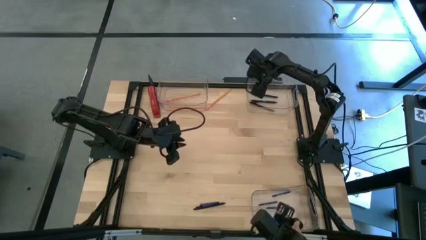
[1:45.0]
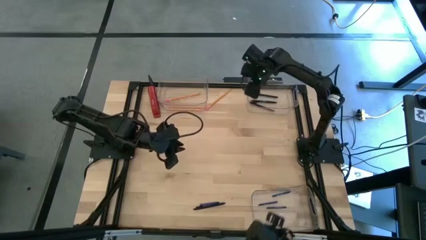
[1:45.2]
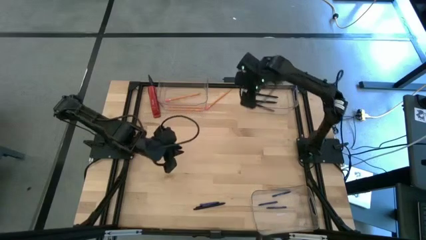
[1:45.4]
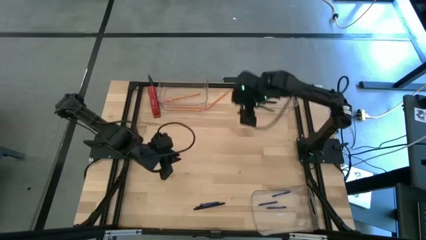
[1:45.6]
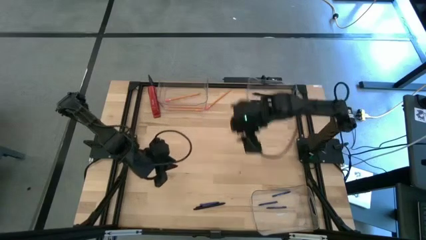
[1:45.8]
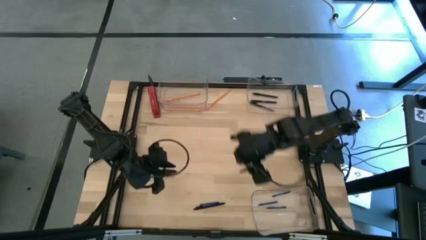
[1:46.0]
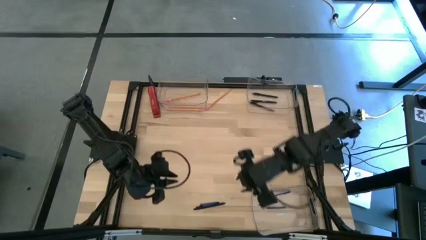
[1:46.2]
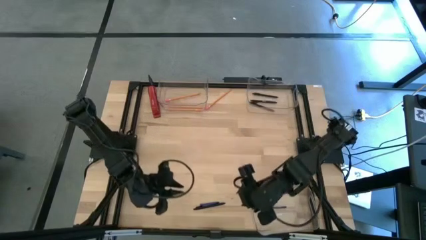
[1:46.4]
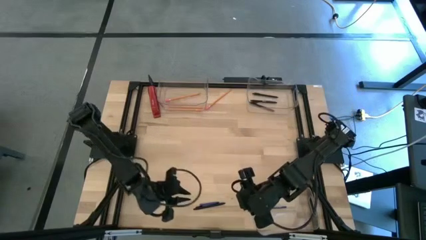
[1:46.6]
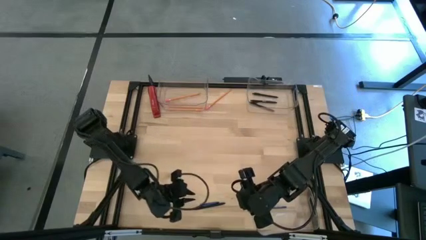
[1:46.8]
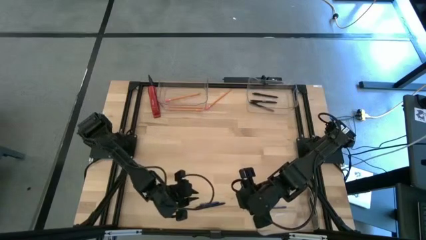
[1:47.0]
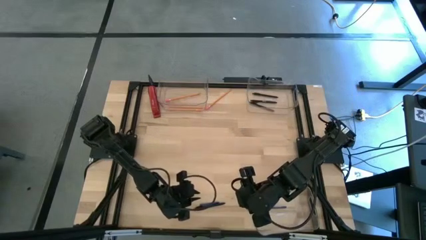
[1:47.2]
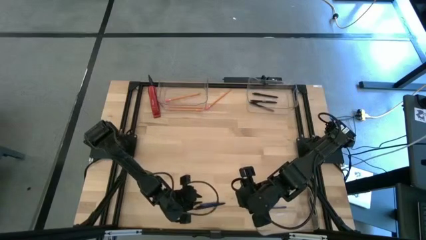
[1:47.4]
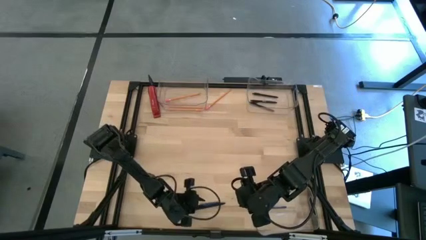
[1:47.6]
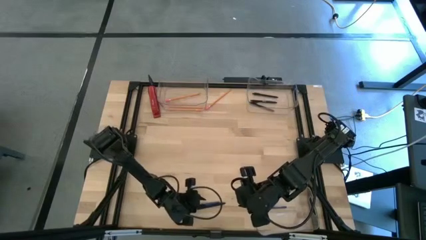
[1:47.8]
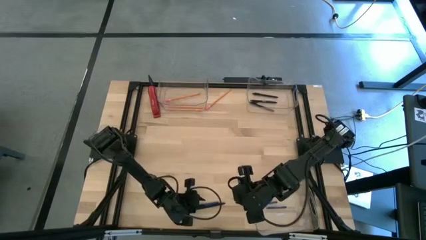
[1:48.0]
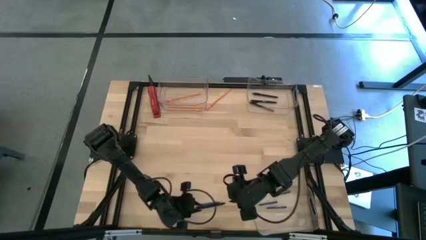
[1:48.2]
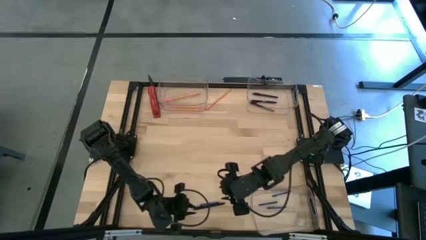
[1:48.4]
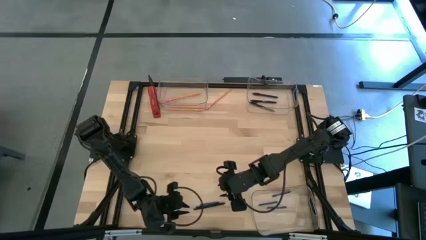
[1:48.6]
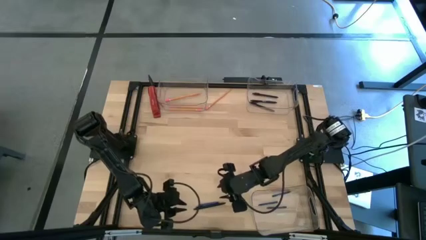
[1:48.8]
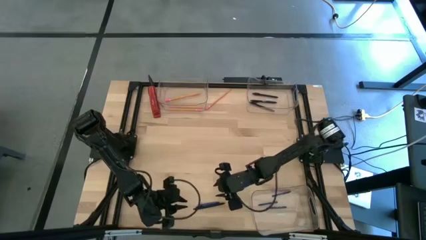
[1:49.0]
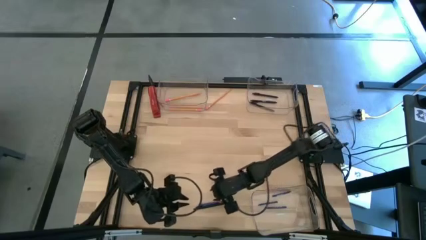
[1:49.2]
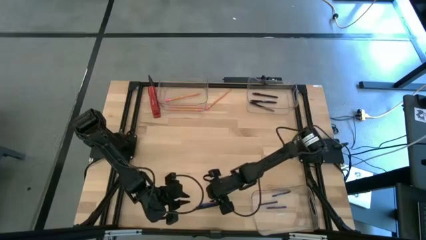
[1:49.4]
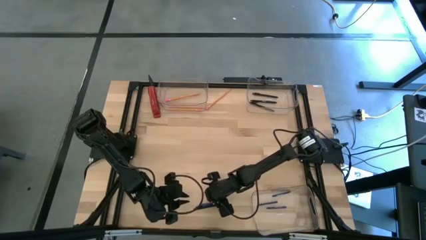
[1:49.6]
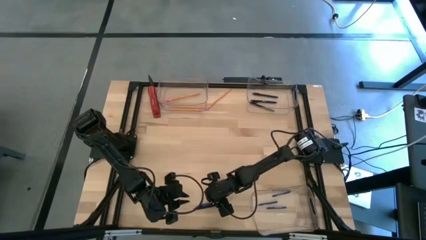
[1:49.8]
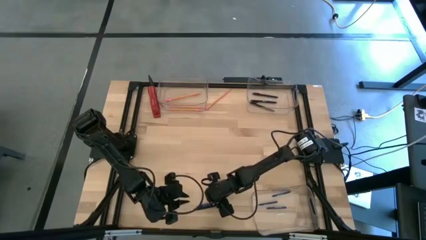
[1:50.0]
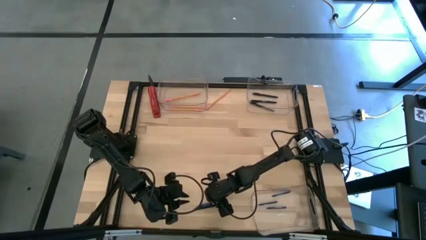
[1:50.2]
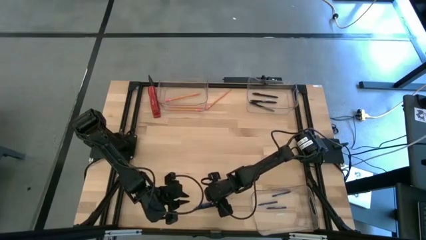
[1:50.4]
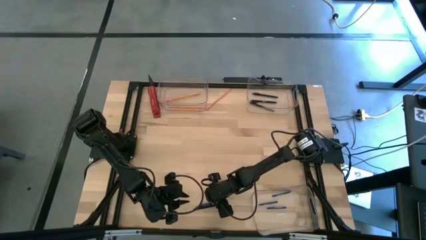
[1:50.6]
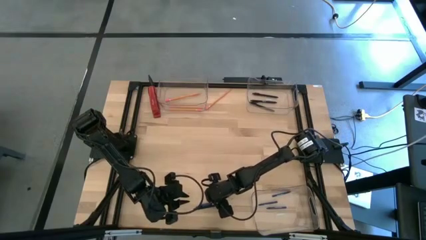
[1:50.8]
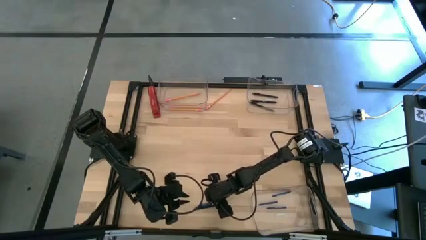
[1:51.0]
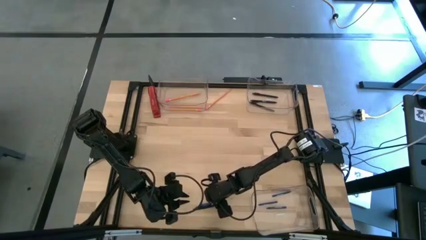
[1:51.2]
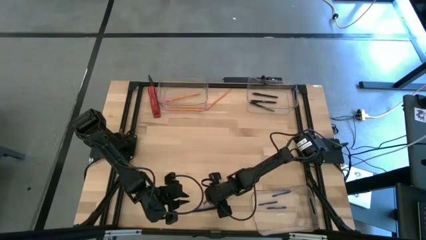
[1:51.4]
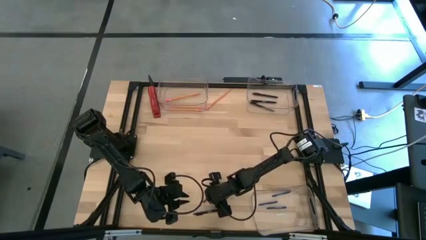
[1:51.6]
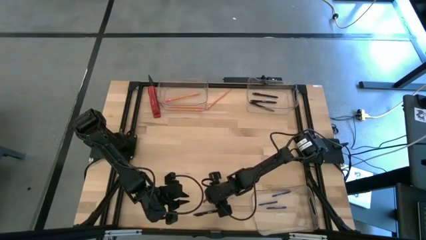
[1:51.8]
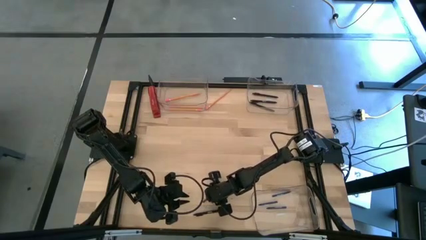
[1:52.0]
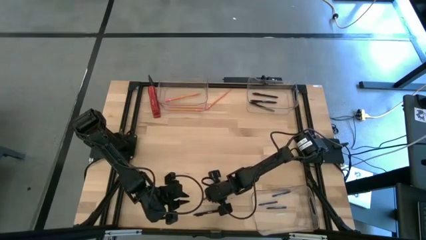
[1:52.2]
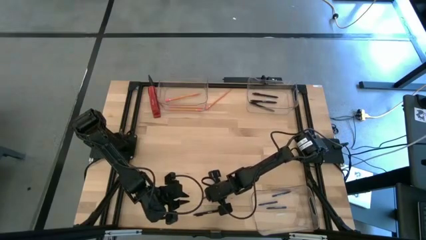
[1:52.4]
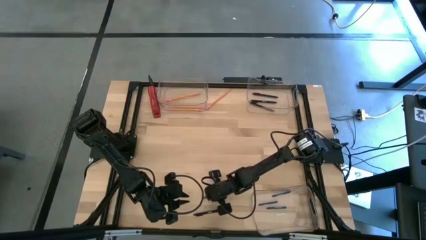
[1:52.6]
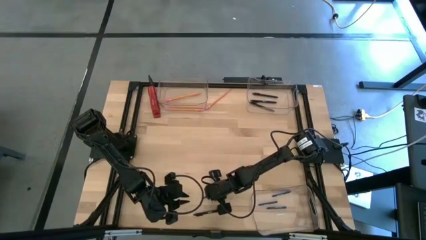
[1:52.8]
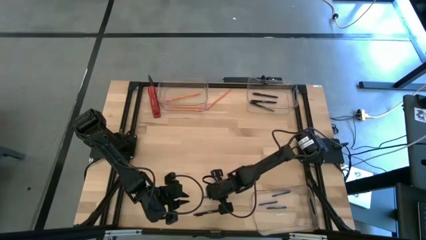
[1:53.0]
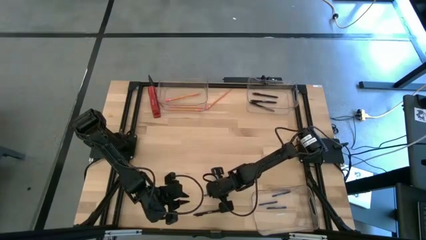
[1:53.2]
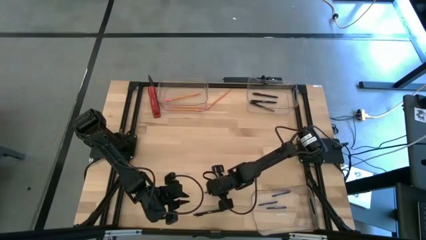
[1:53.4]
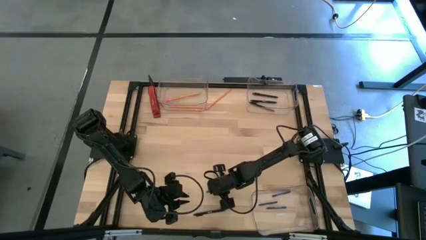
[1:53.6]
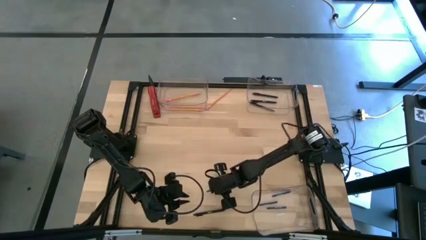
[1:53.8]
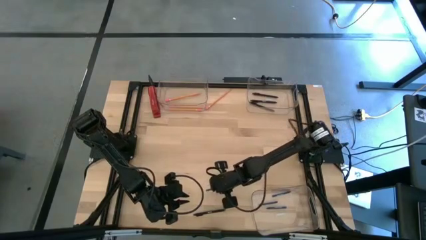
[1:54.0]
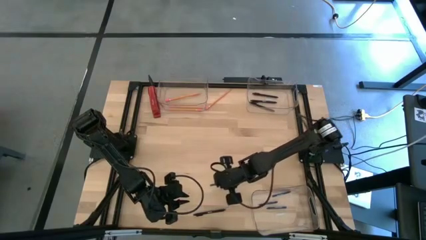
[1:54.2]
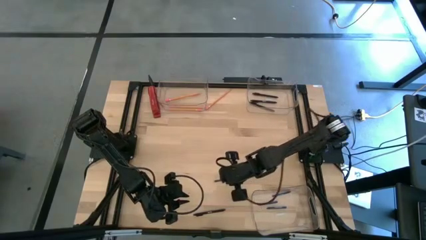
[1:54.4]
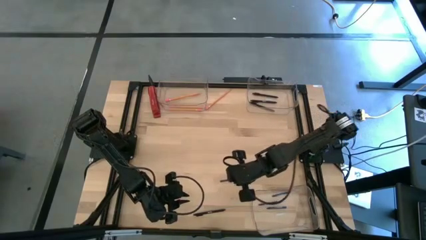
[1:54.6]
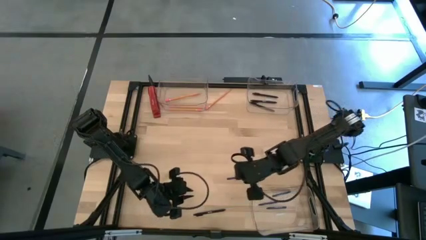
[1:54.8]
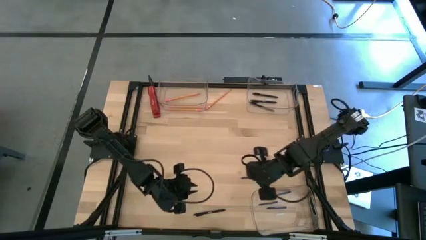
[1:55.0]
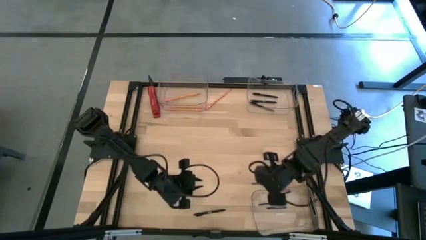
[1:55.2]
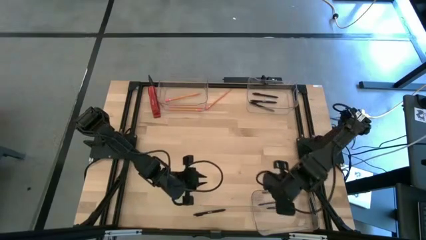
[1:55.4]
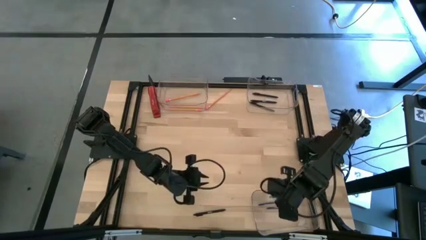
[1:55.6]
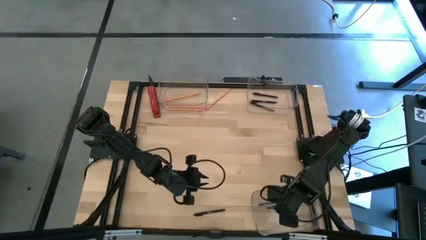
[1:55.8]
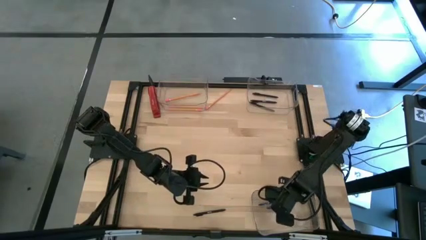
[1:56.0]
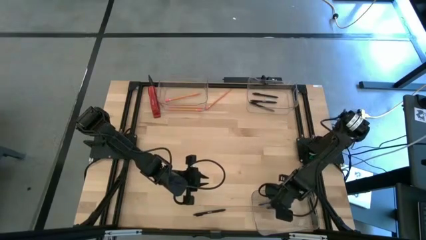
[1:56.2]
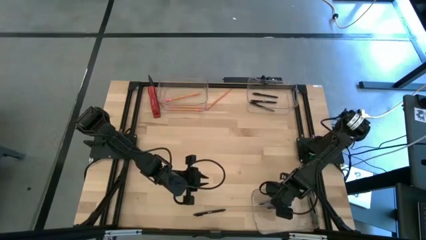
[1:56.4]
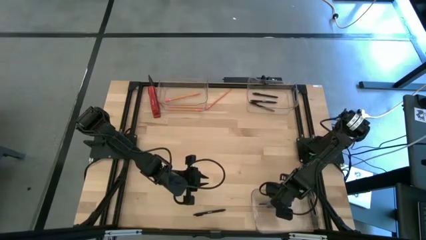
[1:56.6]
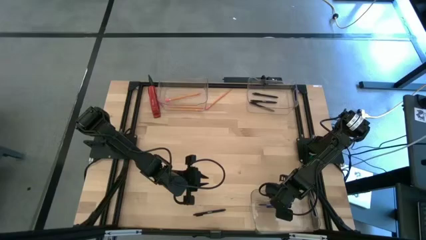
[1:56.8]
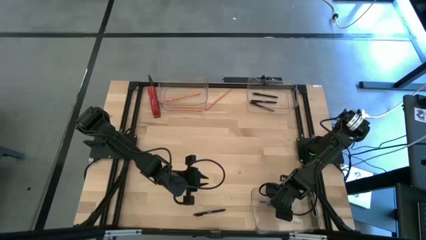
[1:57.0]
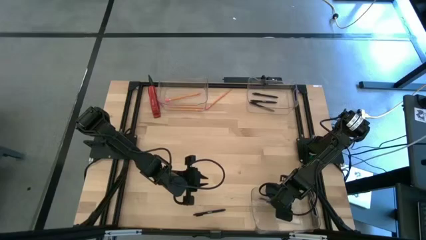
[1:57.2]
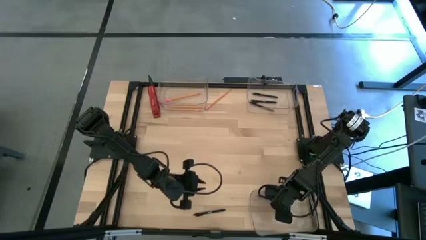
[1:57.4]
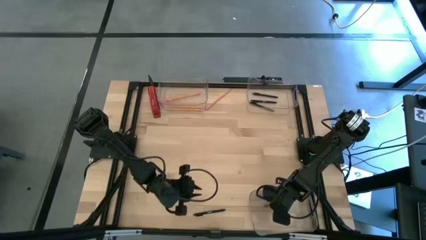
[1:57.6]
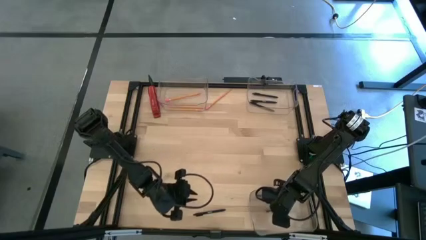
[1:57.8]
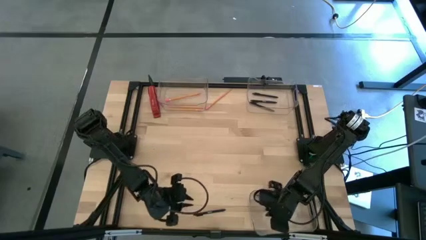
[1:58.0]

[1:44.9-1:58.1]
Task: Sort crayons/erasers/pens/pencils in bins
Put the blue crayon into the bottom transparent bin

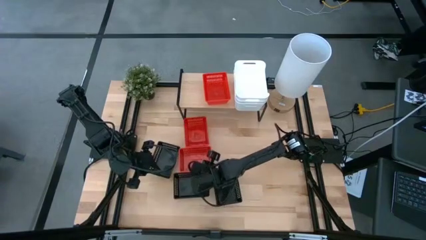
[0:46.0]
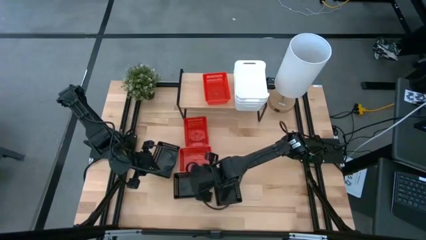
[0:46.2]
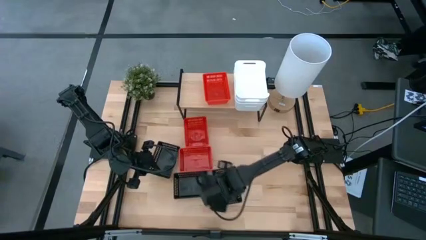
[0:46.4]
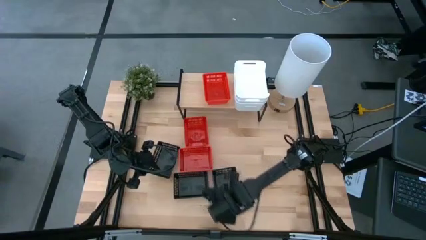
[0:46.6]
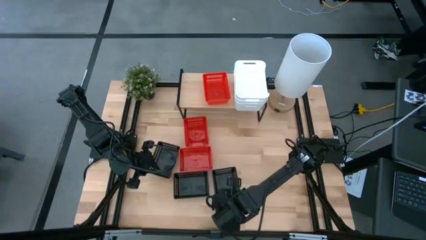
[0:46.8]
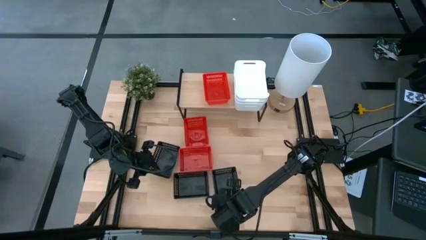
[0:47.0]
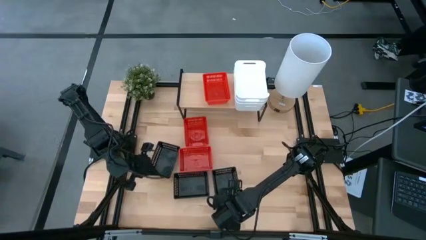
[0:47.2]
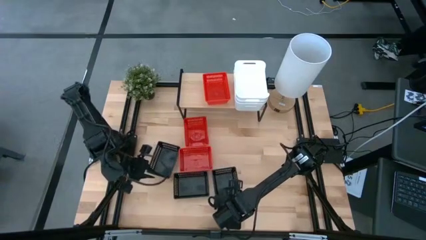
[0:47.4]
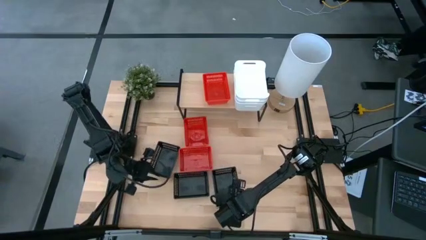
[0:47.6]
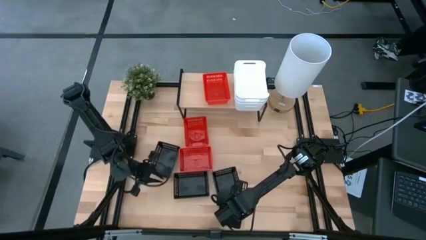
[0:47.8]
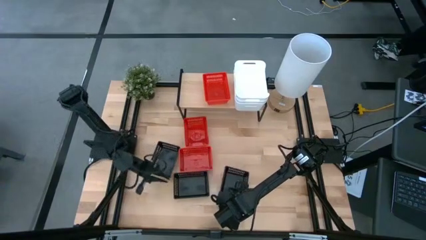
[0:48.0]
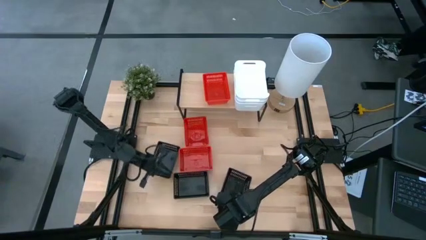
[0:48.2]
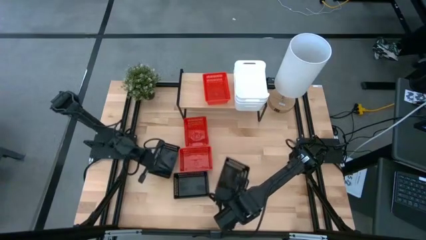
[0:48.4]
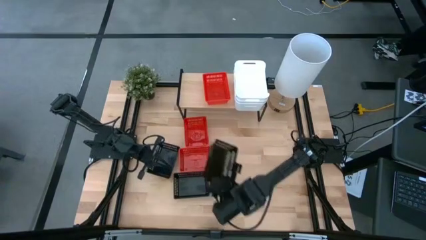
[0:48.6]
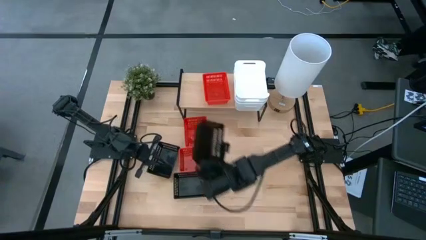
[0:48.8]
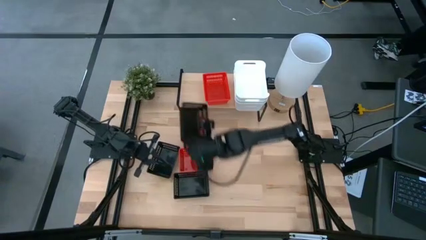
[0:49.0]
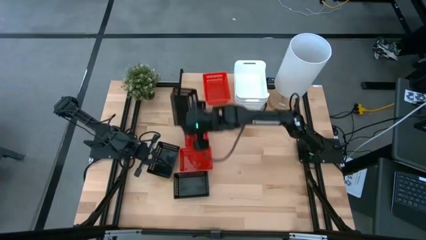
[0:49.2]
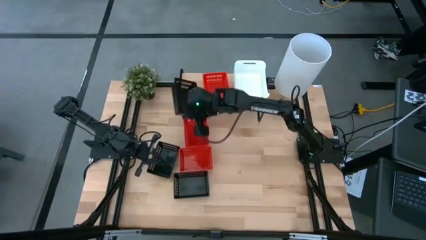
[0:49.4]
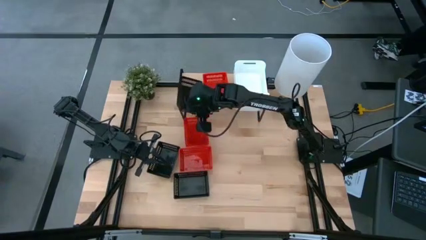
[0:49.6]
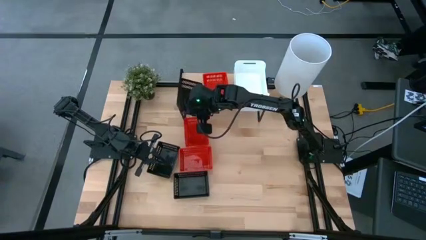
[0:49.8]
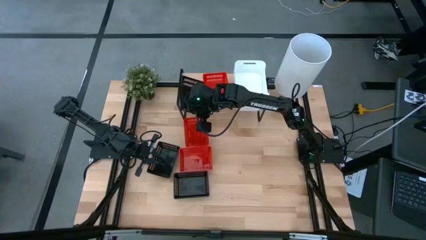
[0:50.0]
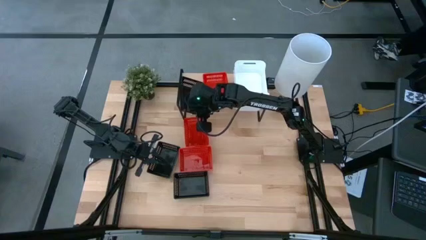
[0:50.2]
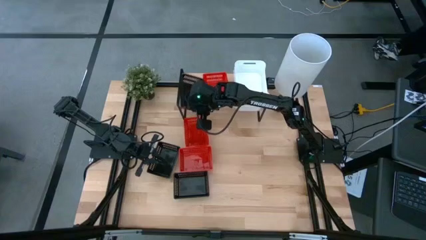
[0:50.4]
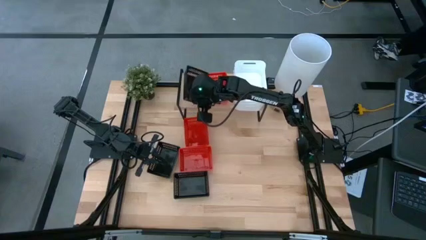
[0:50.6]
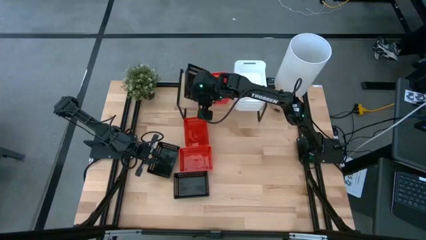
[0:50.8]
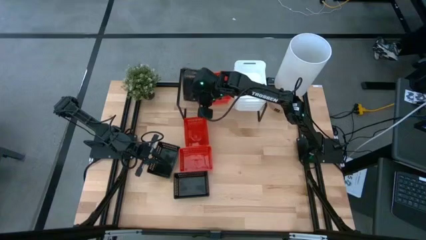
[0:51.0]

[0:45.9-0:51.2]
Task: Stack baskets on shelf by color
Put the bottom right black bin on the shelf
